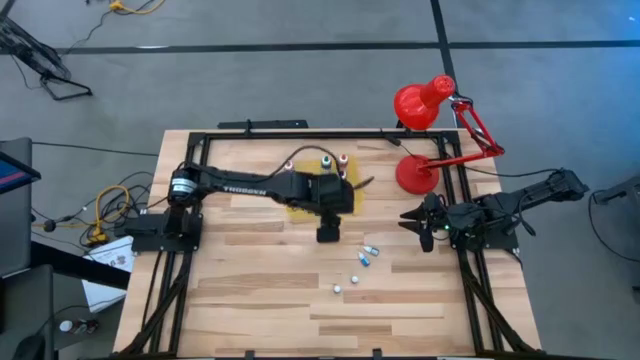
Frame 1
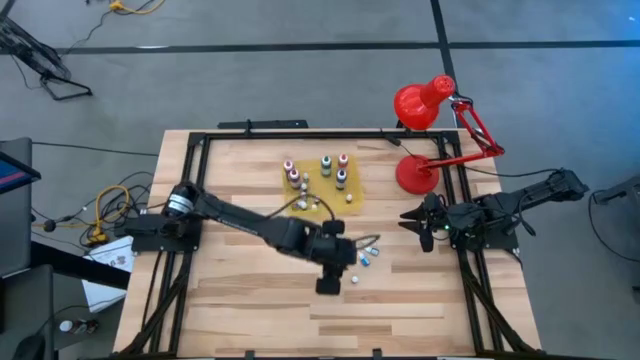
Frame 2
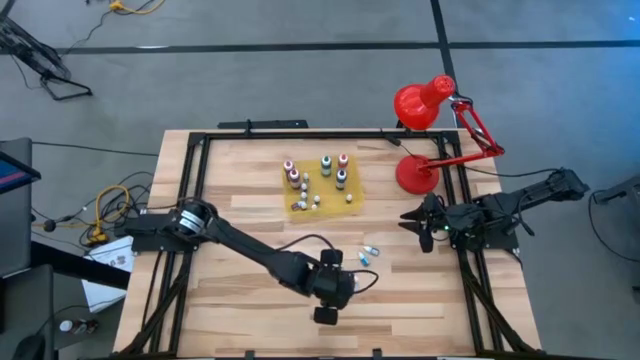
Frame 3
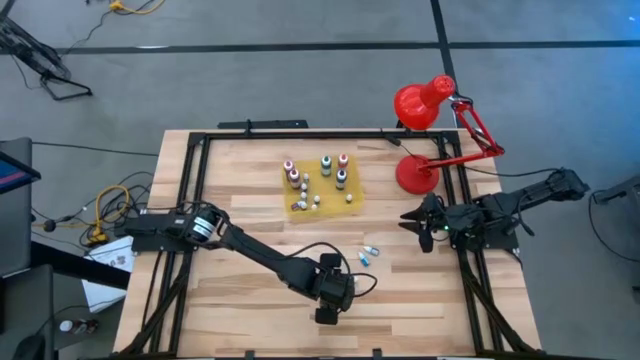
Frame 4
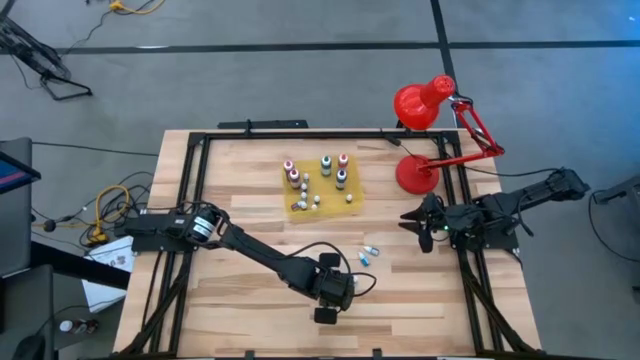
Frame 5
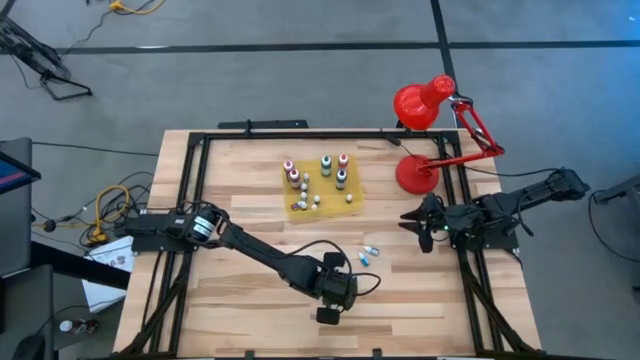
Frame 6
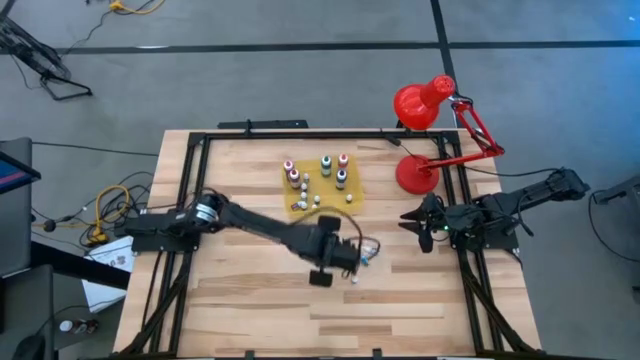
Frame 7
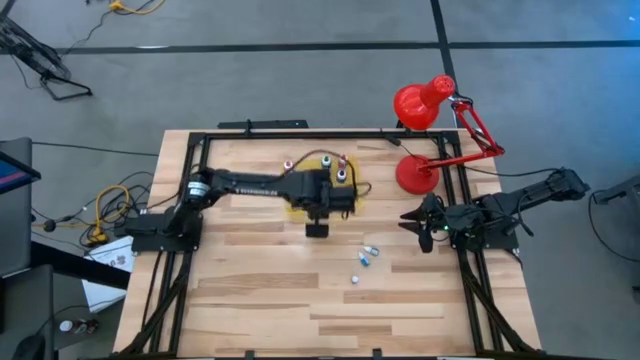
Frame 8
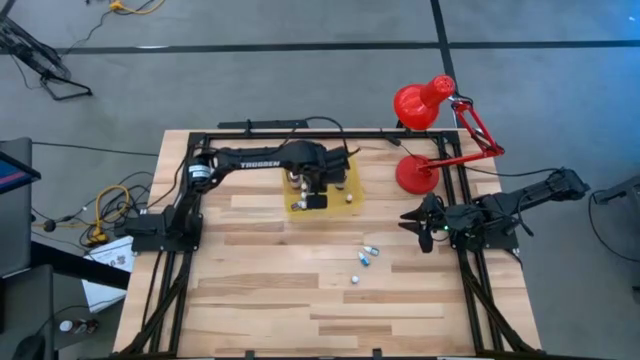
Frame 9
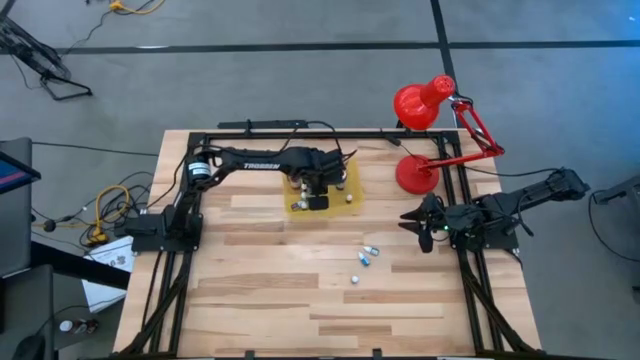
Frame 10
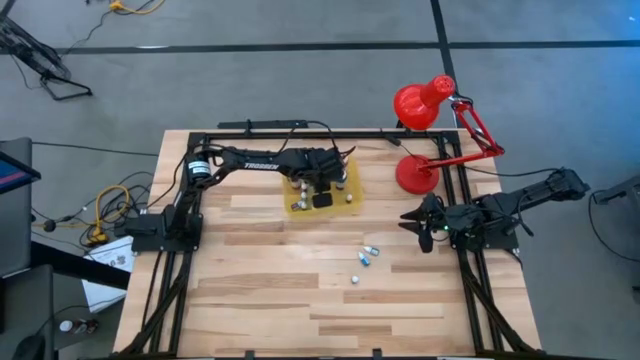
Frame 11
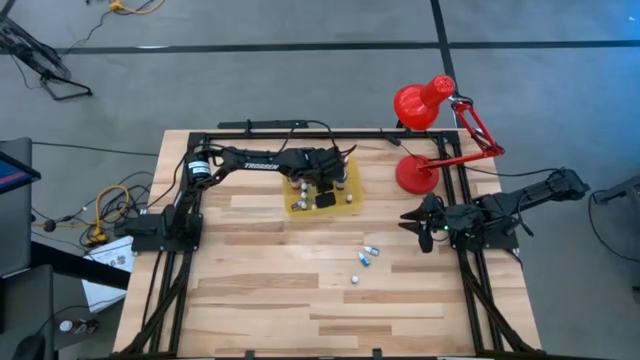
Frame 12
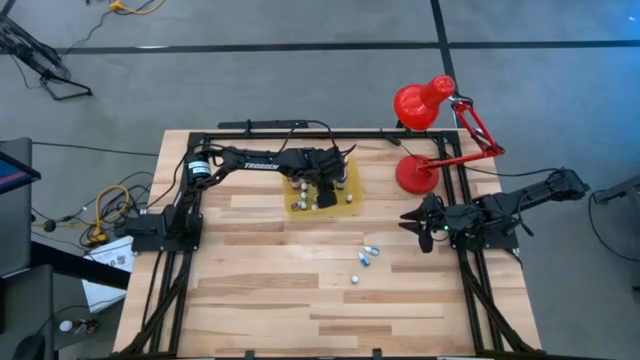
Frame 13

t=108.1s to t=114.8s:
Task: Pick & Place food coloring
Put the small white food coloring in the bin

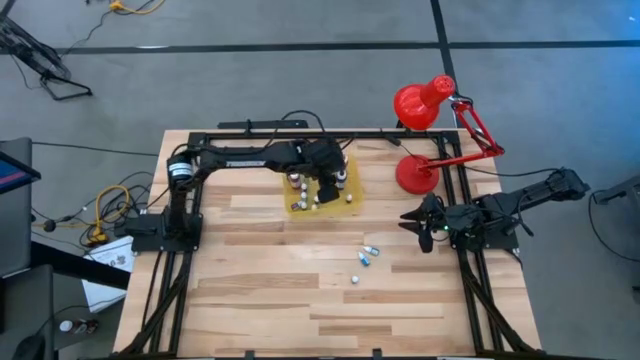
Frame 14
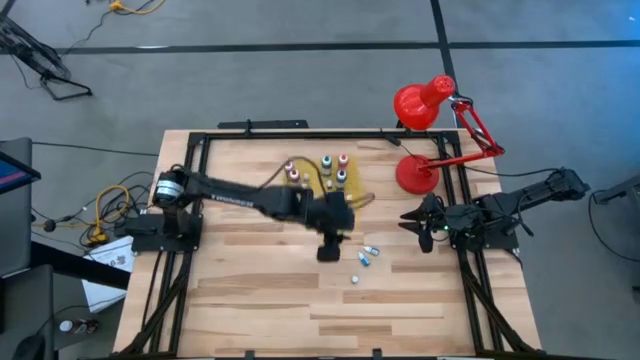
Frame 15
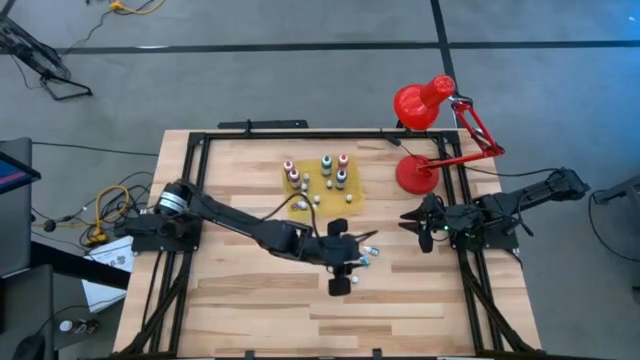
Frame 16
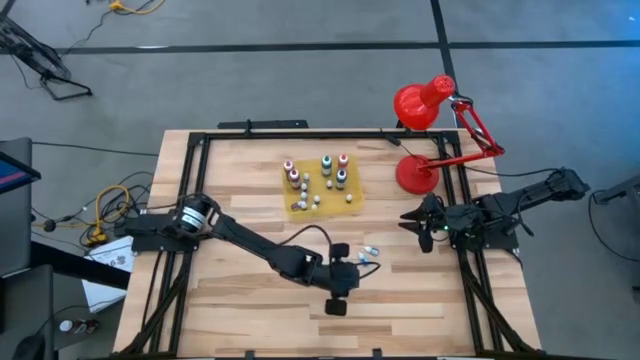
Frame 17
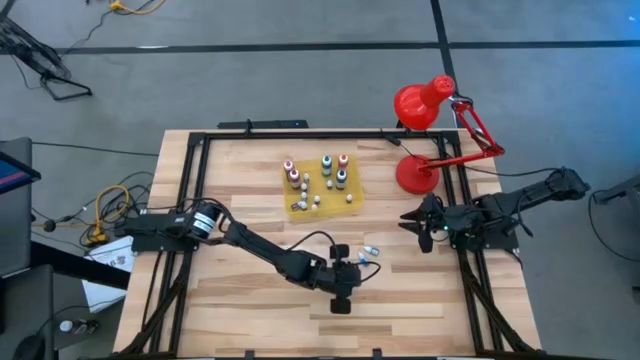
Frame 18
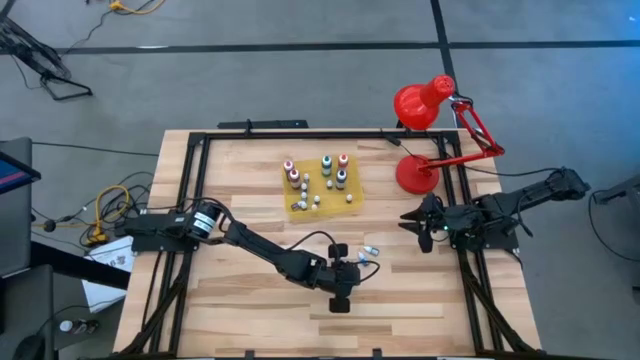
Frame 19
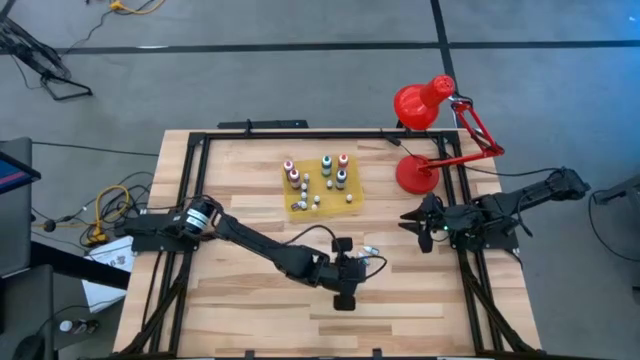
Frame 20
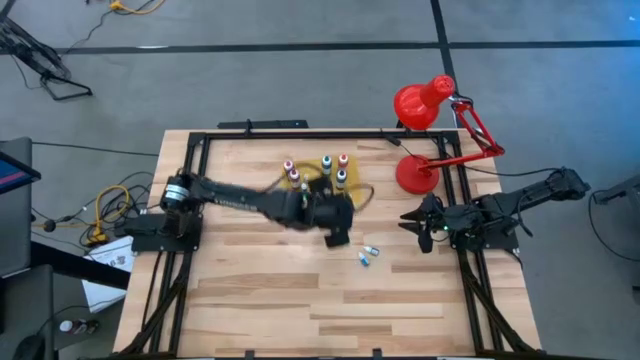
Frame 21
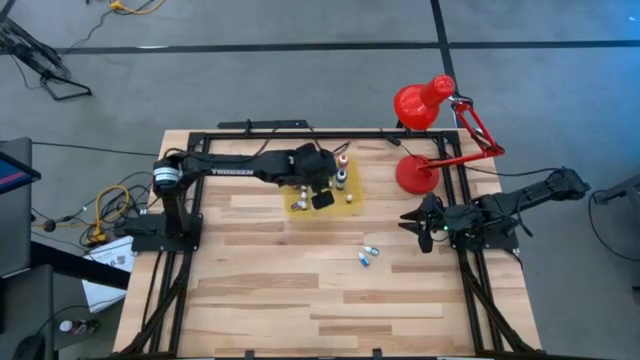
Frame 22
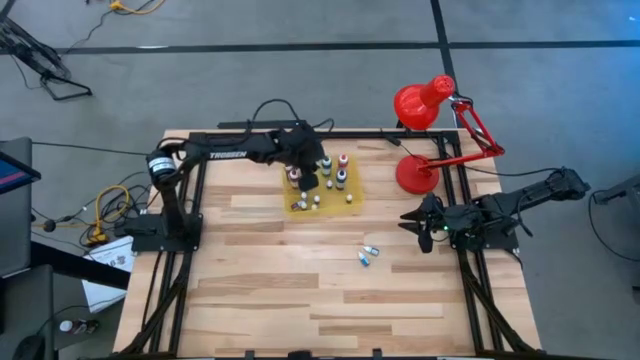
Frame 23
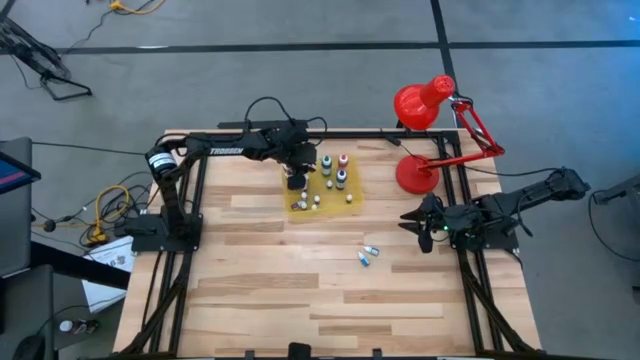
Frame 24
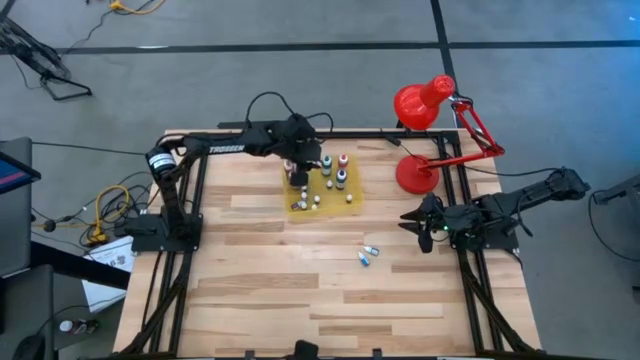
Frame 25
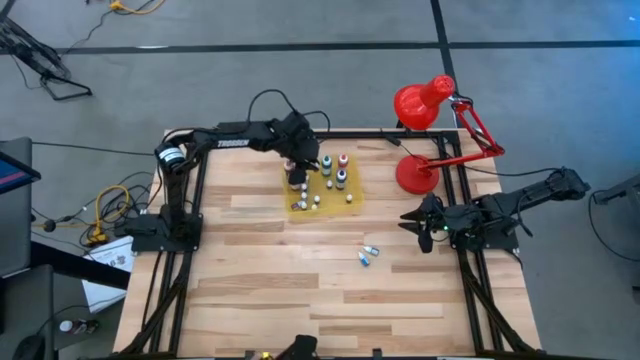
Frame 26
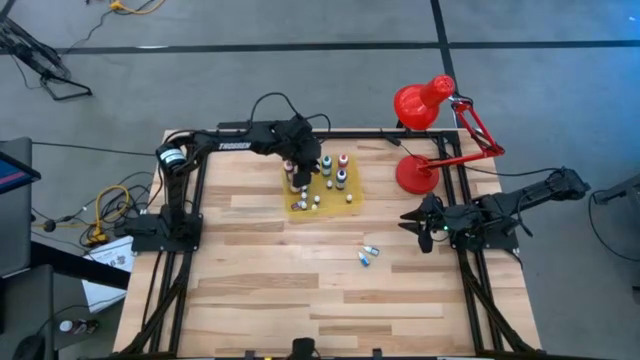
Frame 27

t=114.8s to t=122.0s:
Put the small white food coloring in the bin

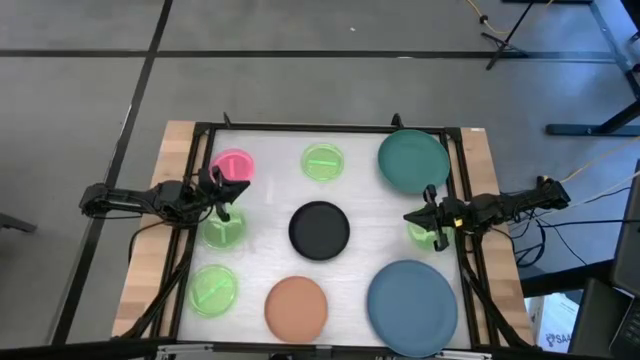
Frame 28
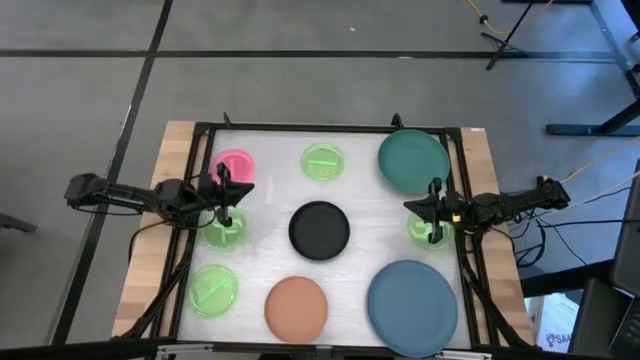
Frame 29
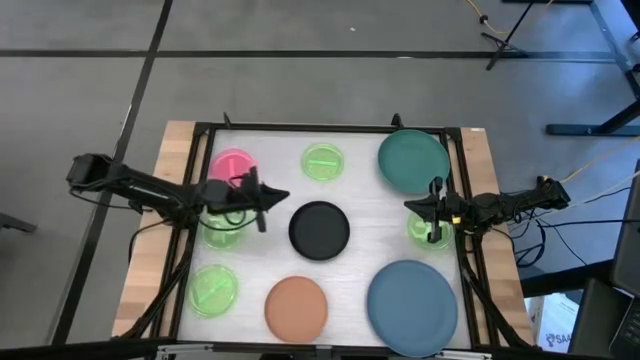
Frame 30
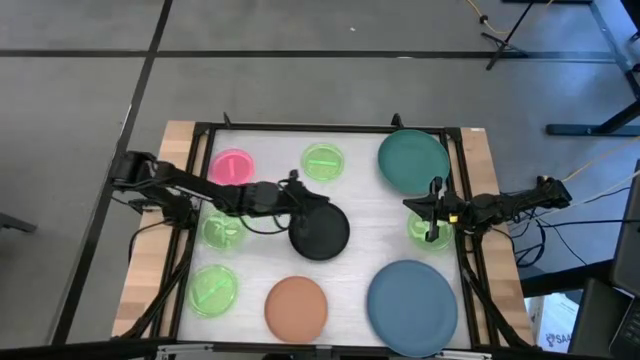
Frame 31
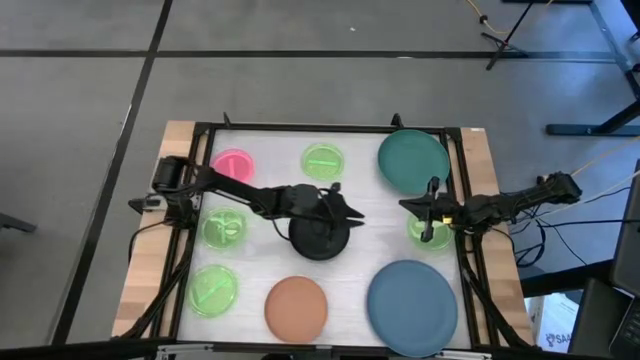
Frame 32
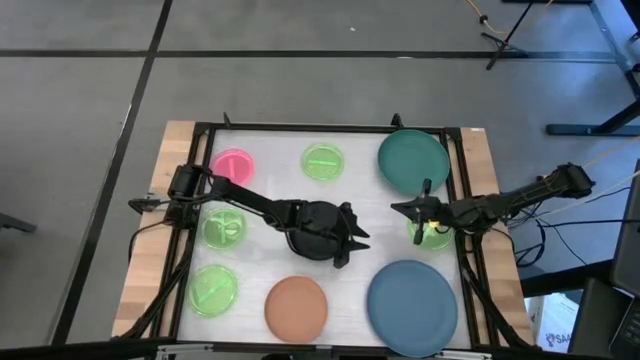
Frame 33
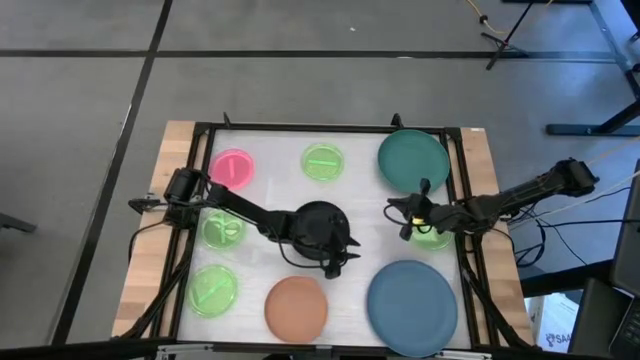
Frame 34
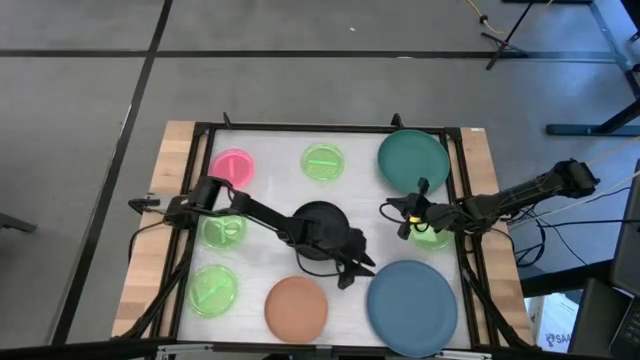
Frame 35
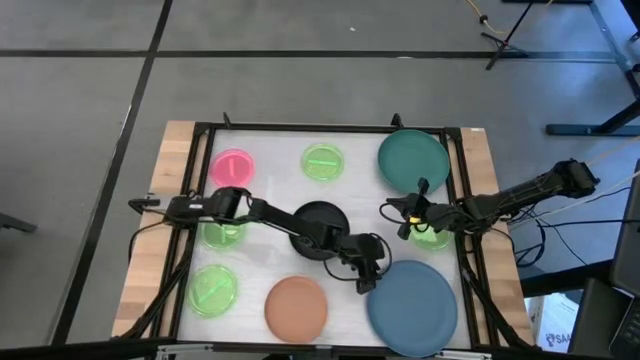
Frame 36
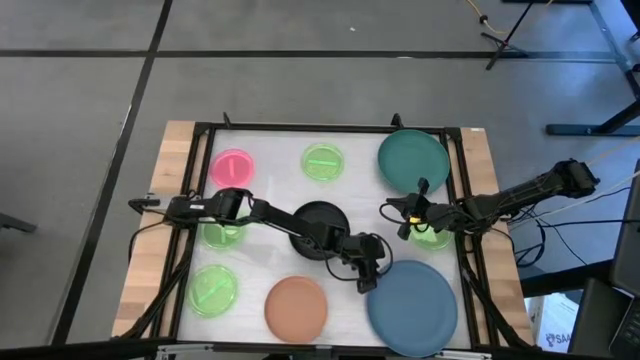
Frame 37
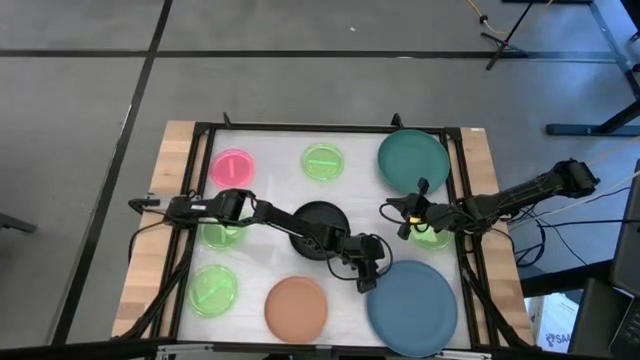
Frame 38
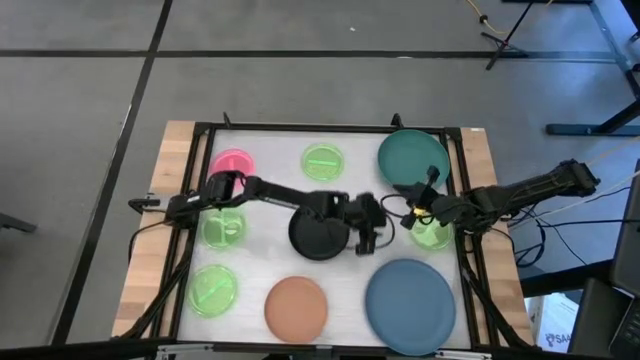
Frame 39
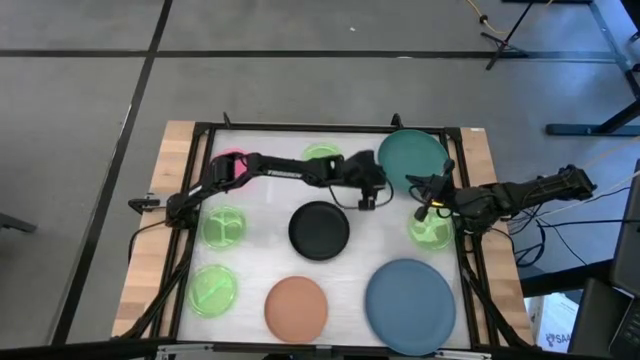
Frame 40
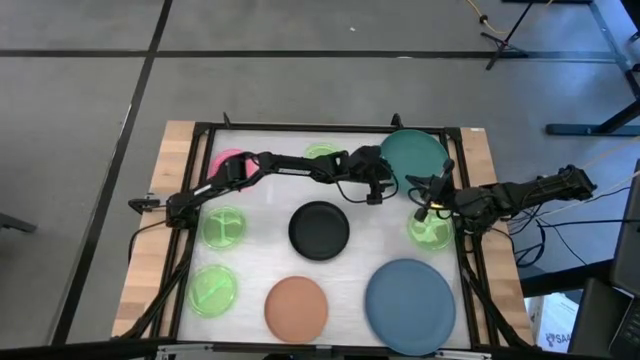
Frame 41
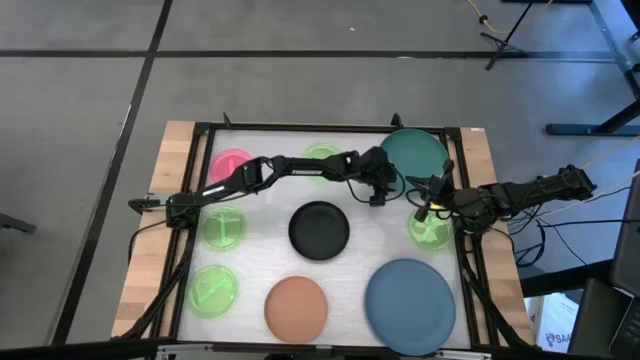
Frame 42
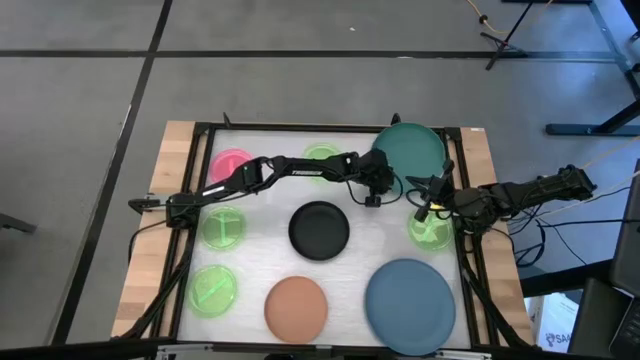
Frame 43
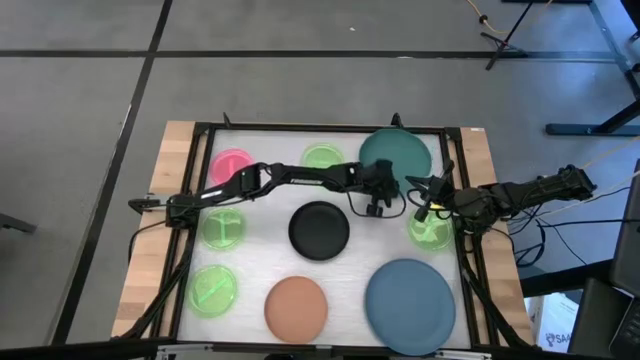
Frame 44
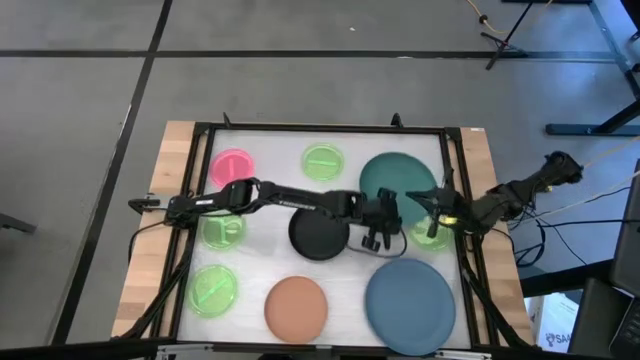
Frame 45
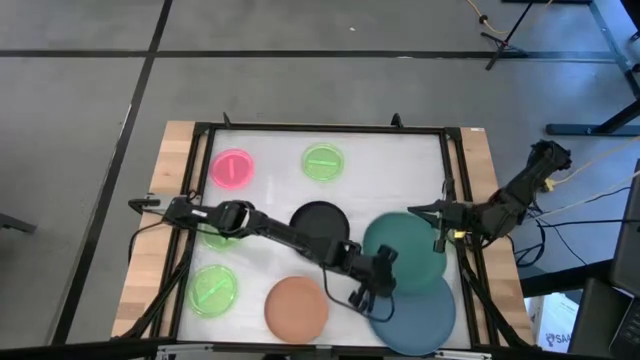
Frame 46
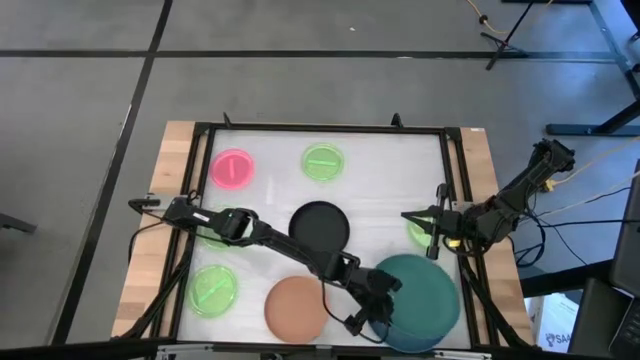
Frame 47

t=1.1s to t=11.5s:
Task: Stack plastic plates
Stack the dark green plate on top of the blue plate
